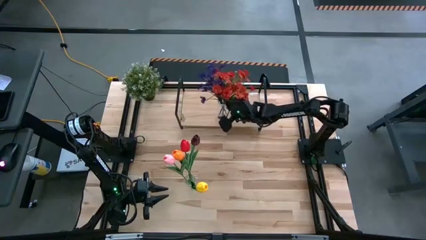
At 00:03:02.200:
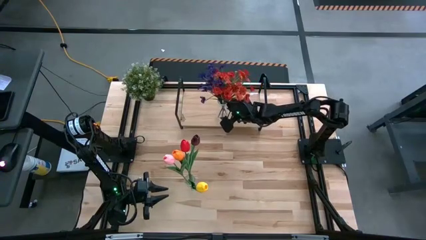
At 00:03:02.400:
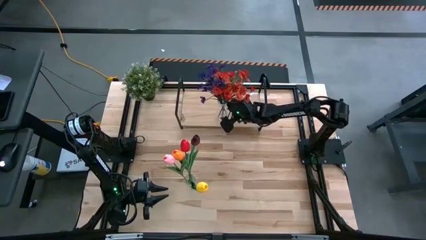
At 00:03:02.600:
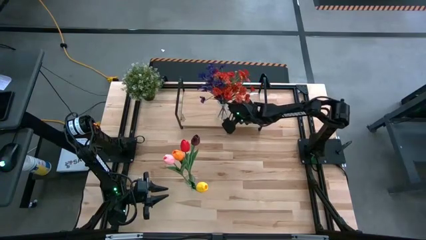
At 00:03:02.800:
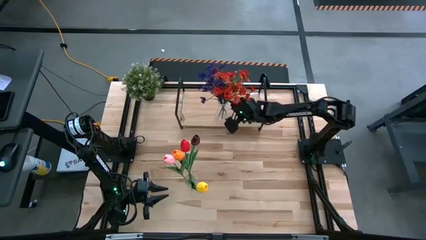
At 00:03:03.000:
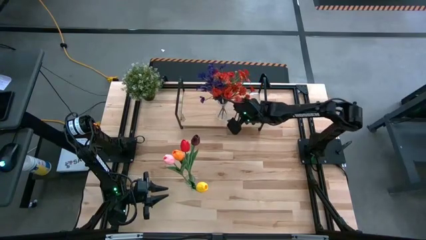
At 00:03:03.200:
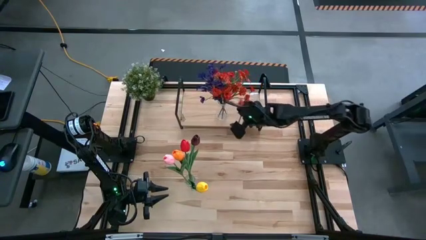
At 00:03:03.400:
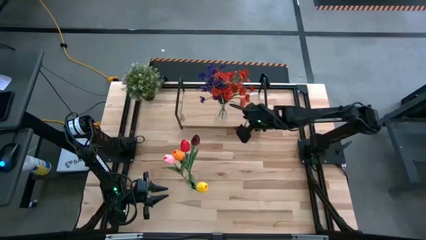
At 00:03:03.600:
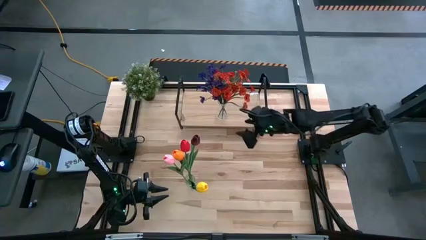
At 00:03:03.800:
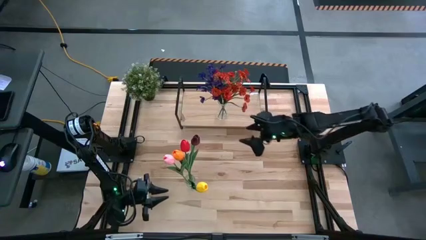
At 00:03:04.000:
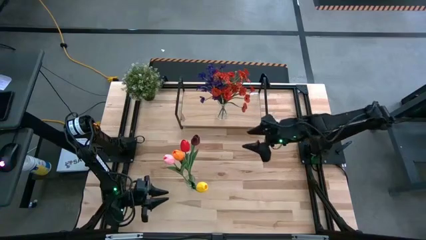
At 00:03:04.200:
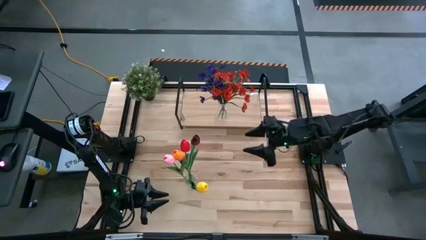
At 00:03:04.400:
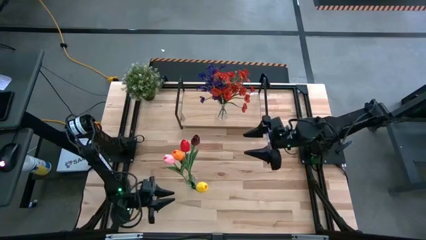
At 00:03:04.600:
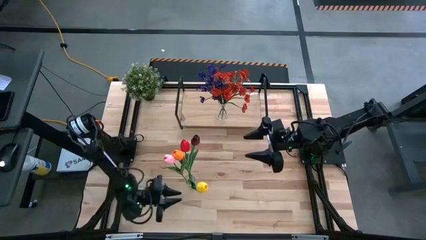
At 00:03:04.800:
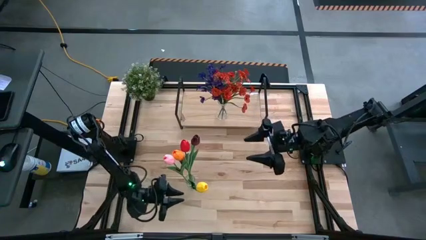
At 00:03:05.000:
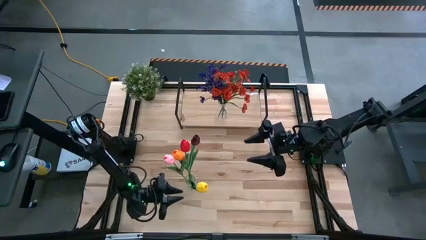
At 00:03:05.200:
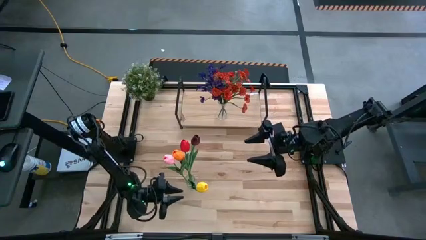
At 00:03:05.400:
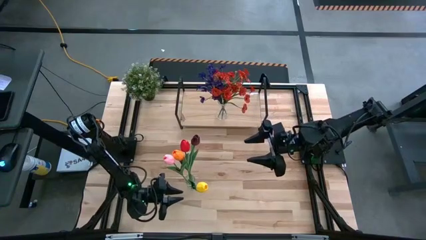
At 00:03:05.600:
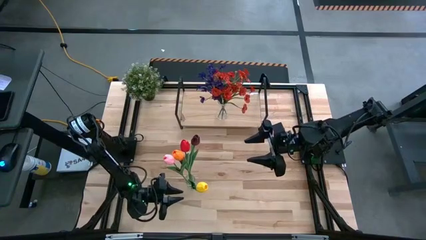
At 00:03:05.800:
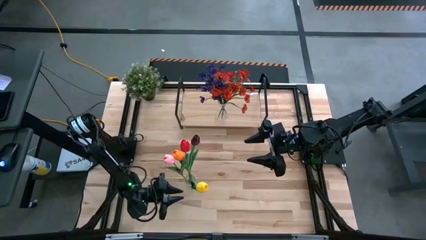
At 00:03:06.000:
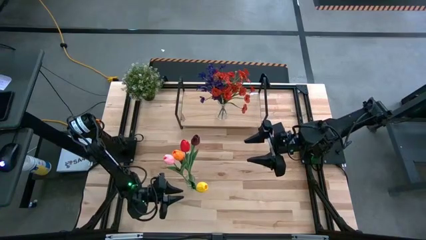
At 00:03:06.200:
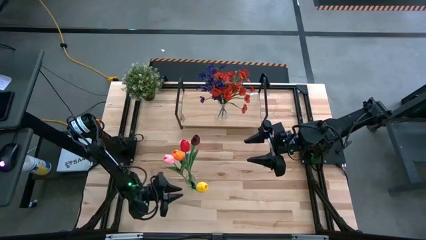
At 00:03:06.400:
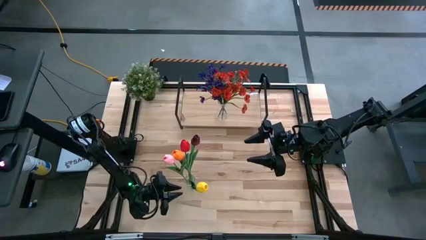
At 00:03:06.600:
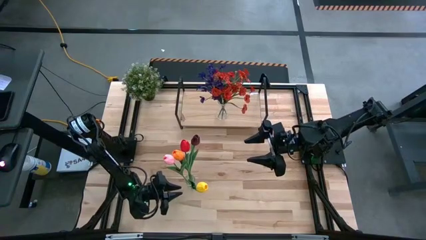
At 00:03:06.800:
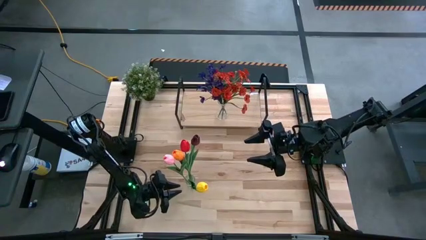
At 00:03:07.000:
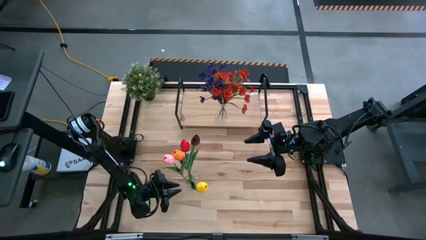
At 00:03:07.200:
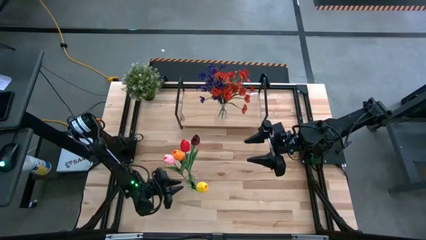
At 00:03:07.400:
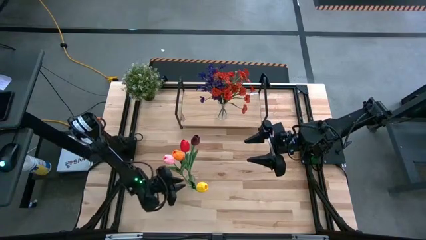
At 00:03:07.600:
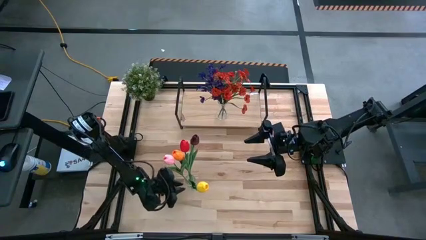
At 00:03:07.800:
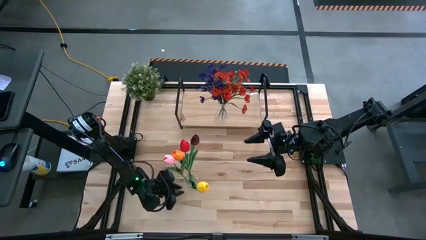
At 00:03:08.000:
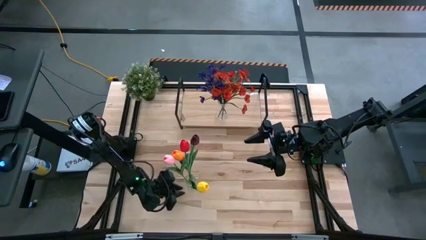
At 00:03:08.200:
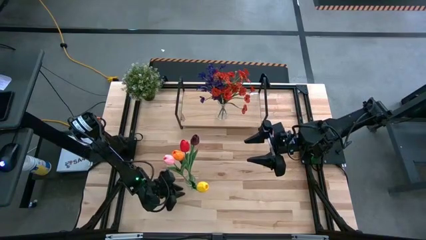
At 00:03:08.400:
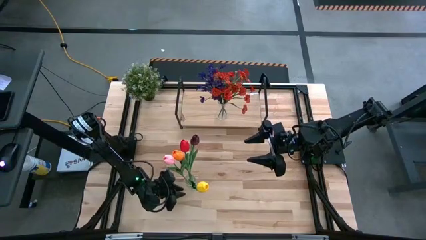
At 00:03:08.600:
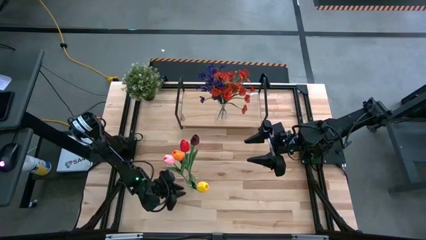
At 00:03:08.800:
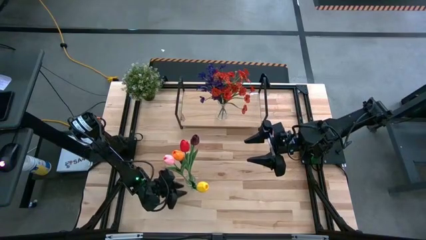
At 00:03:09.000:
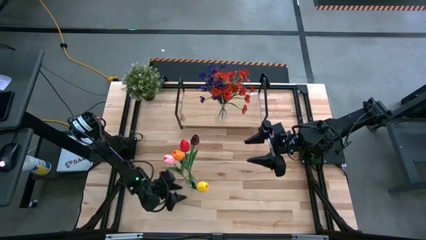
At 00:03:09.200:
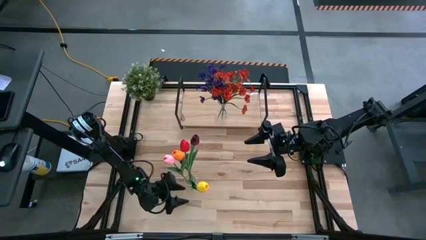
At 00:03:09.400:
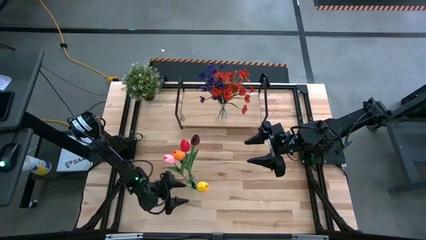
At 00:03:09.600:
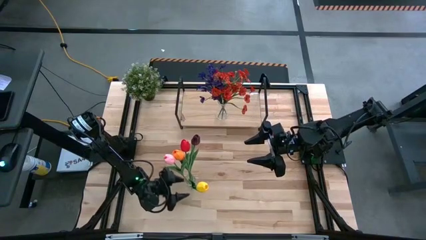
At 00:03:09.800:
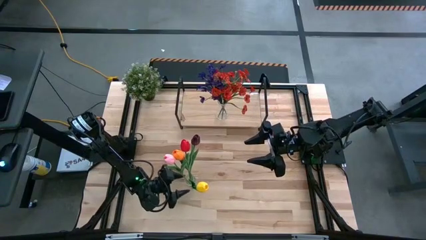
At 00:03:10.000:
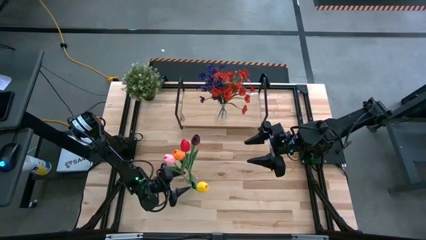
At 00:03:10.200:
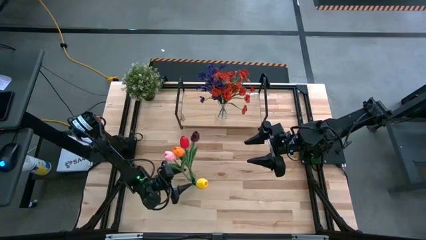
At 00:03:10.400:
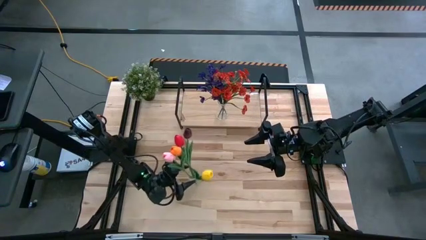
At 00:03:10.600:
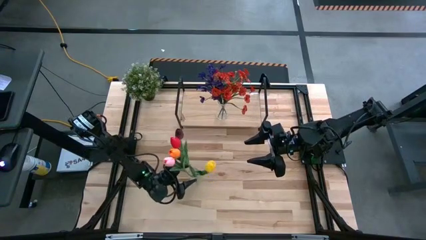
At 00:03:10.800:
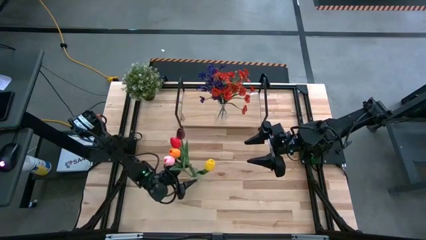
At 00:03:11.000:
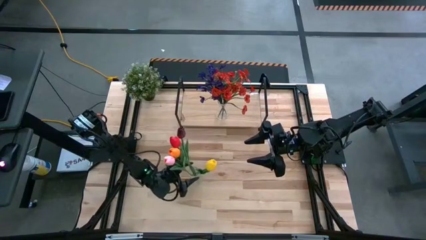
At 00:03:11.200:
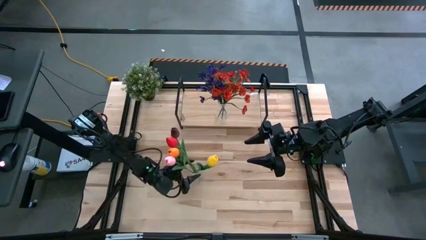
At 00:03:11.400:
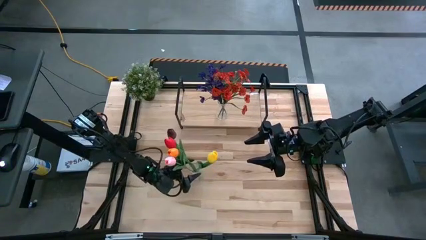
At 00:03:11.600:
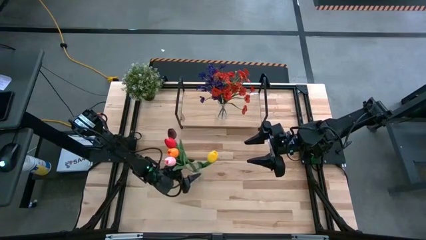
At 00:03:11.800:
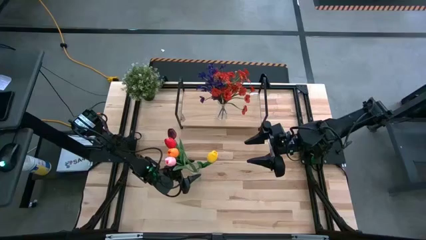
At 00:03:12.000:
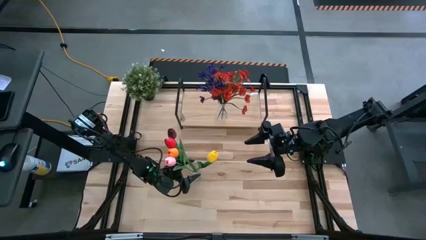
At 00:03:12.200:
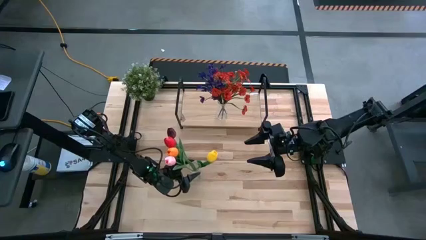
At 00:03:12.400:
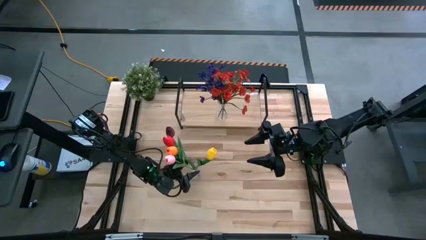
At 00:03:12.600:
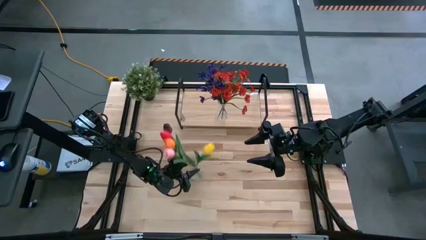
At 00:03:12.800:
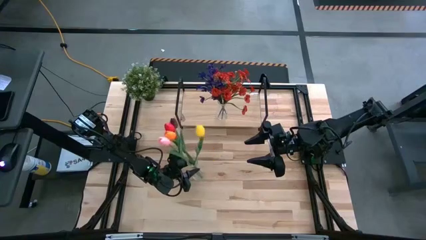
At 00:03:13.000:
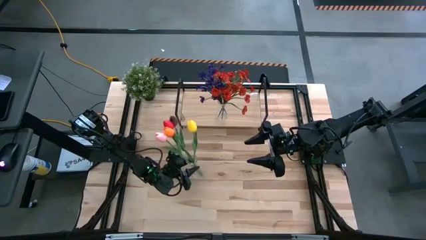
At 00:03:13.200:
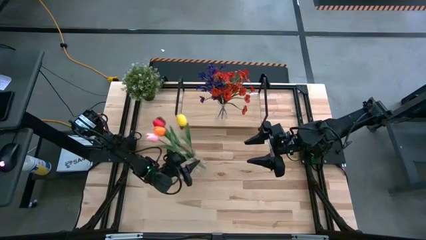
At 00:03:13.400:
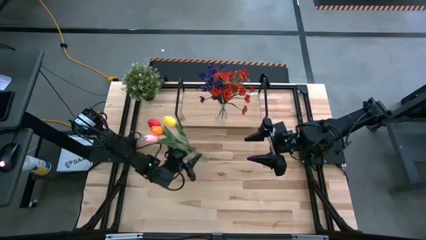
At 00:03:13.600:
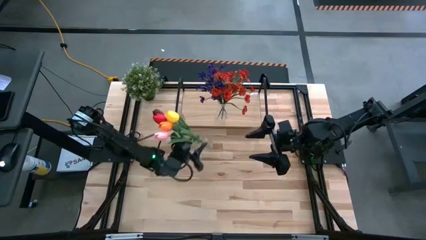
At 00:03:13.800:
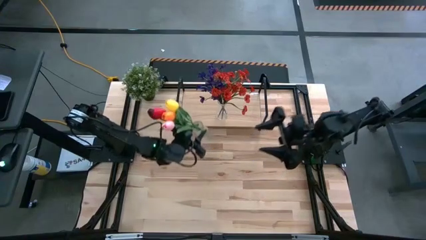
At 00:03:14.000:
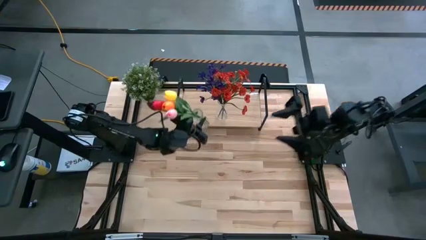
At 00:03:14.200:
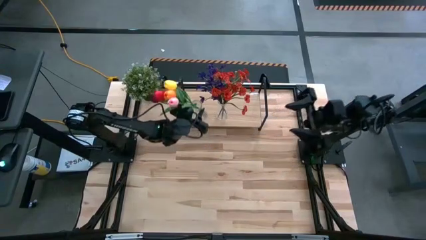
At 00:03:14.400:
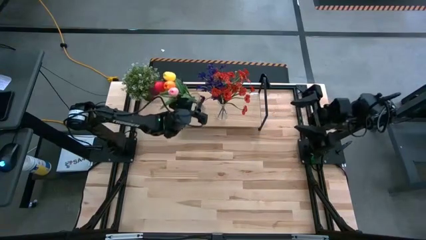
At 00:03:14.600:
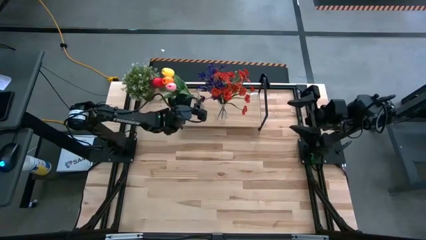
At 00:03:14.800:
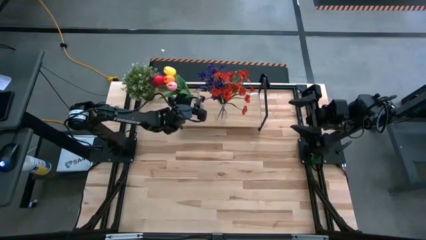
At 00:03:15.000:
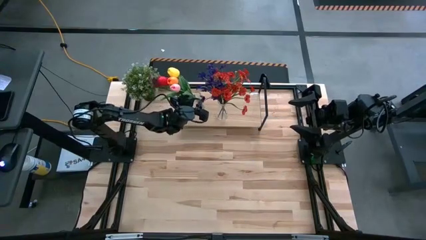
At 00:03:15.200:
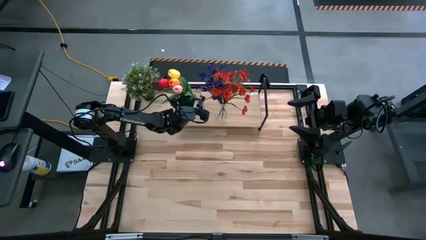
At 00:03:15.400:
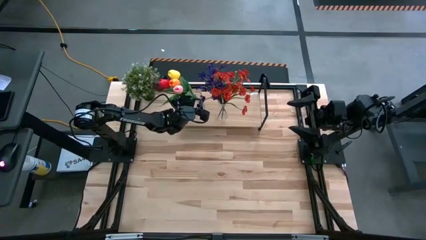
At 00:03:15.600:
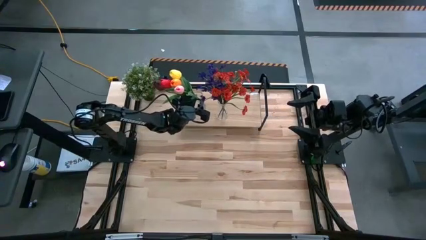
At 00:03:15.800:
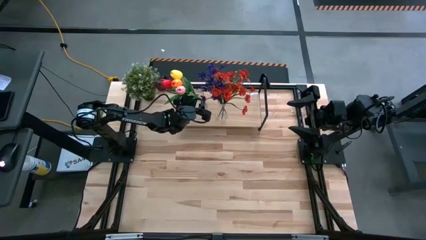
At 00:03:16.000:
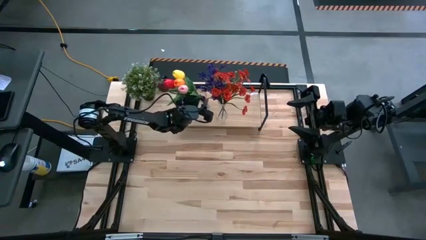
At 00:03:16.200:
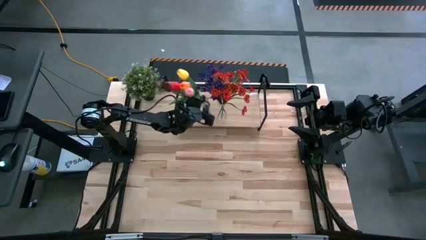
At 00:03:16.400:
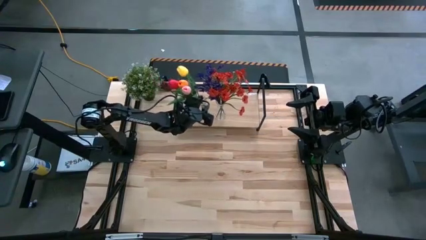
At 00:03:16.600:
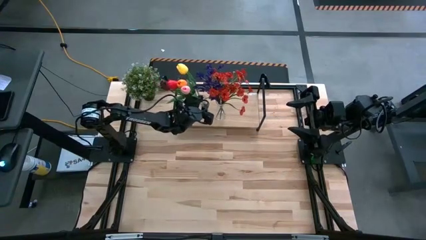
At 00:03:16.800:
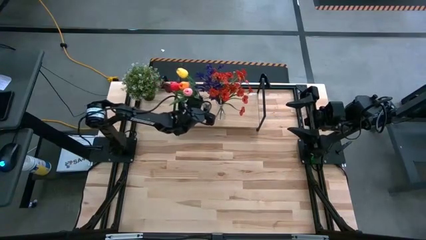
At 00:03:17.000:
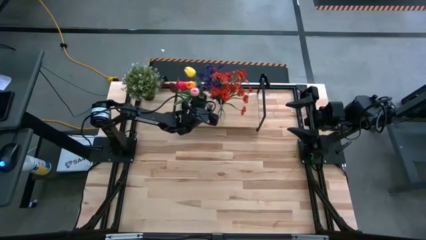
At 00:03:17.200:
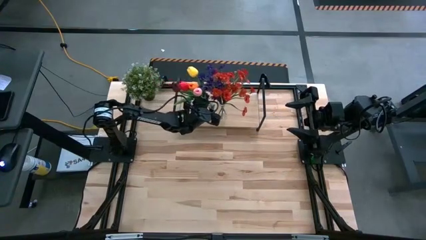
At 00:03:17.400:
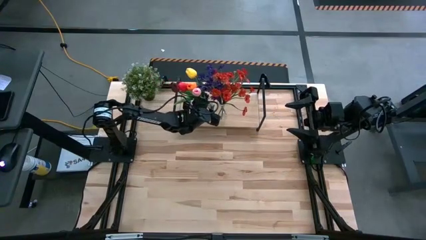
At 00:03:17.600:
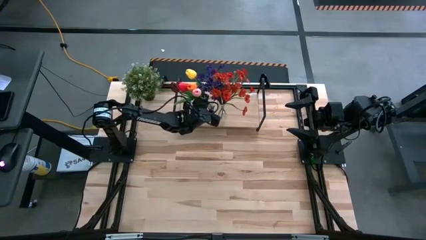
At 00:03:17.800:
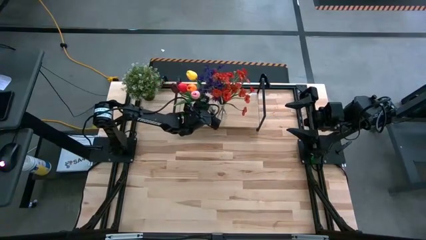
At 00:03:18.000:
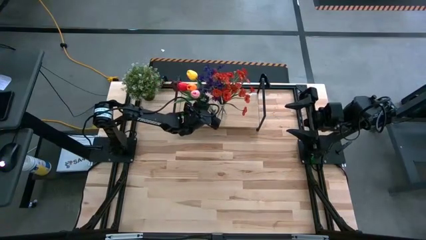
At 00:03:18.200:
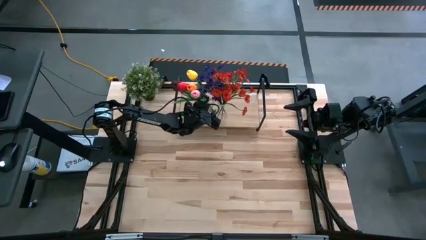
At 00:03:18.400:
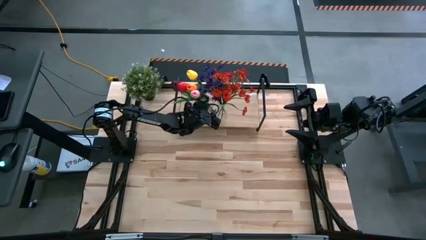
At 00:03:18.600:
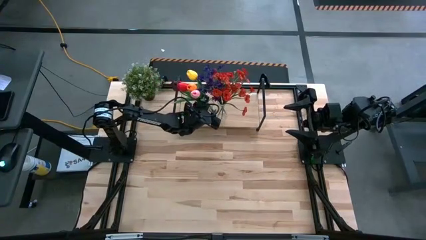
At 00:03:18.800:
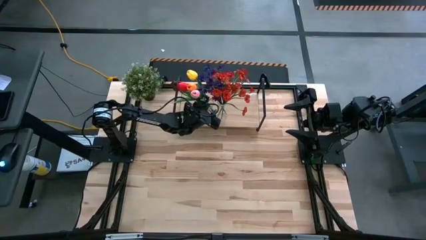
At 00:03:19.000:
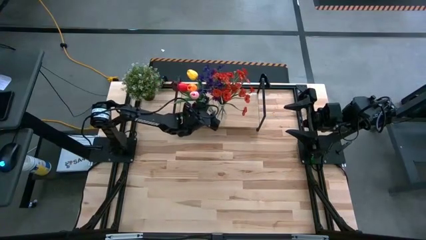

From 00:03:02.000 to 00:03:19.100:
Task: Pick and place flowers into a vace then onto a shelf
Put the transparent vase with the flowers on the shelf
